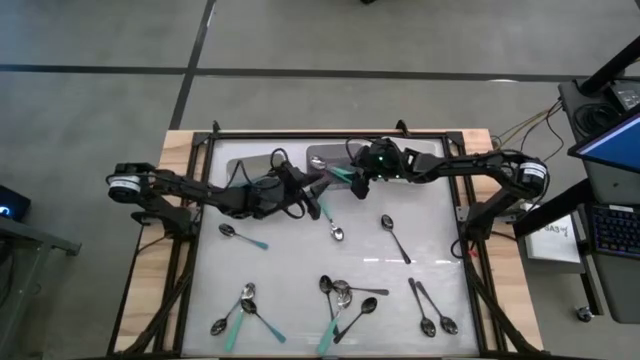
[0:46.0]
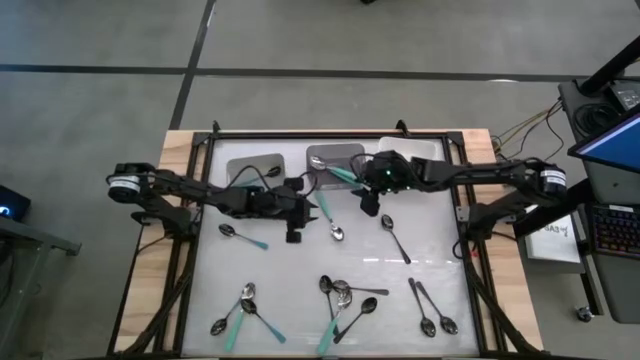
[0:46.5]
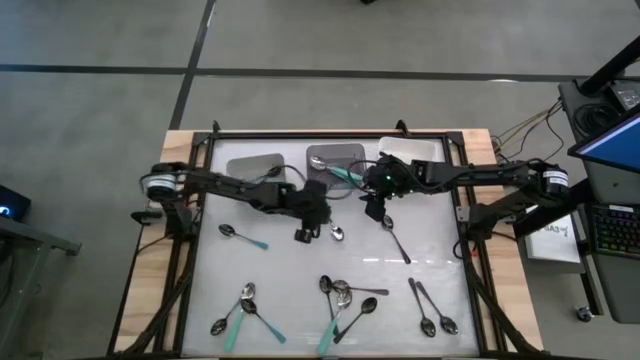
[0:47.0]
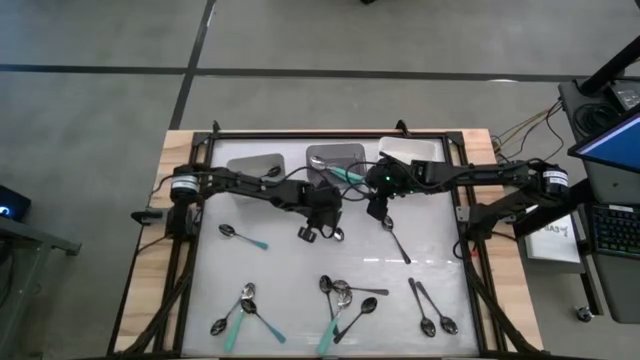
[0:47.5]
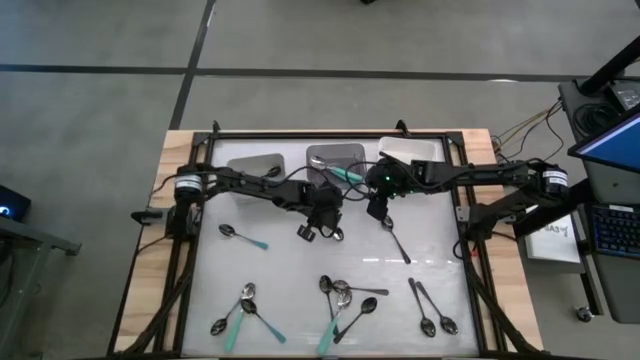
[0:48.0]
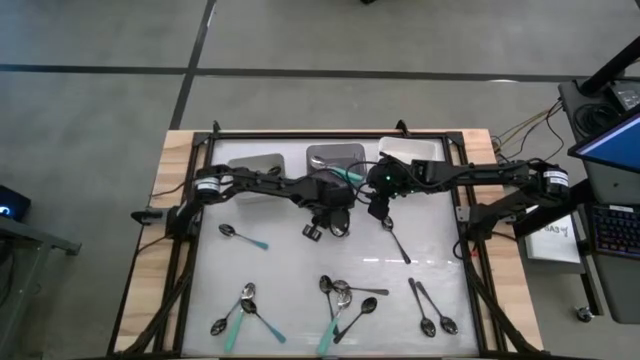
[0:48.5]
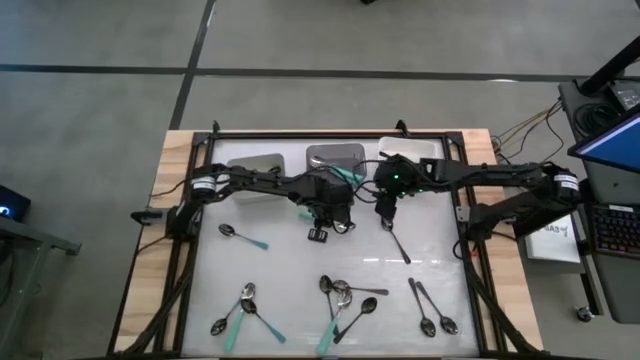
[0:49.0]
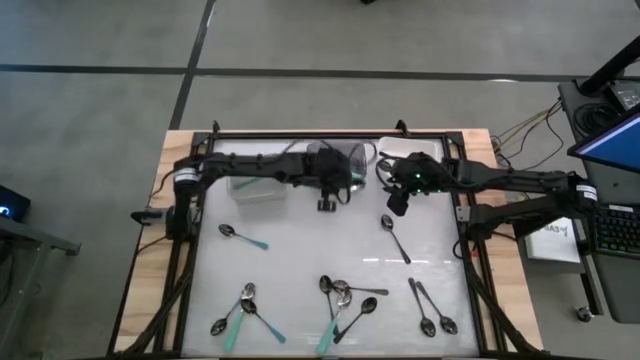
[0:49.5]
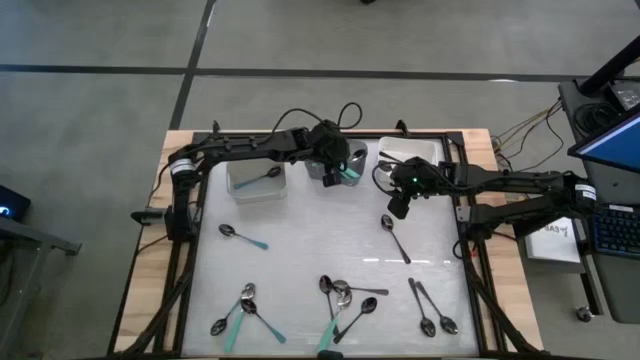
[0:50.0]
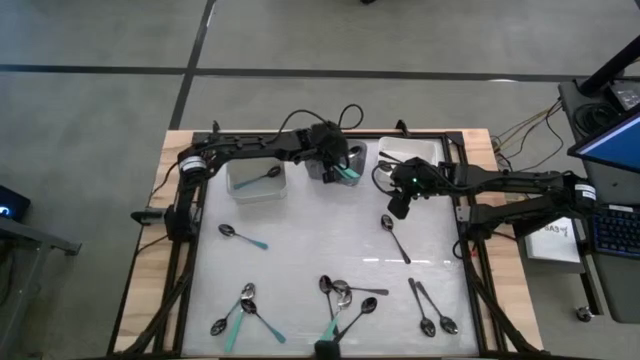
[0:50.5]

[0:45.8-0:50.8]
Task: Sort silverware by color (type)
Put the green spoon into the black bin

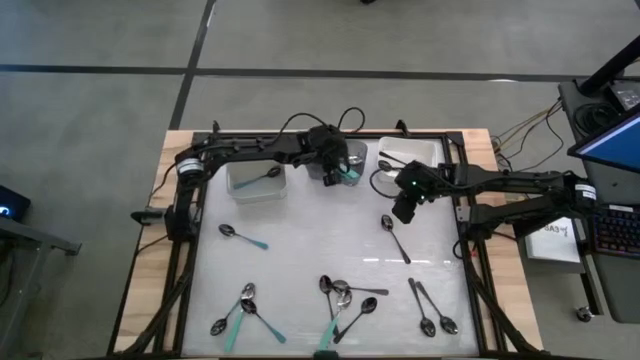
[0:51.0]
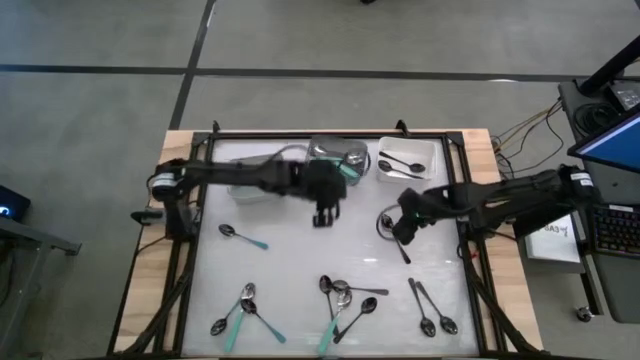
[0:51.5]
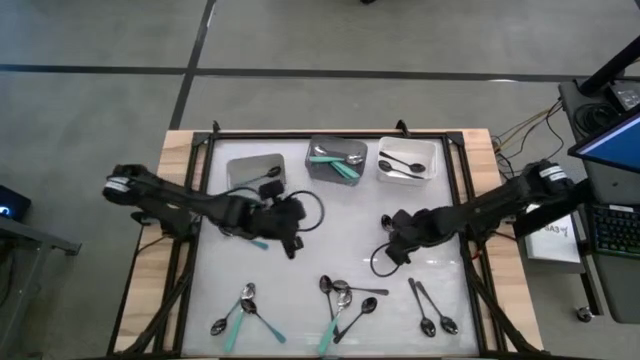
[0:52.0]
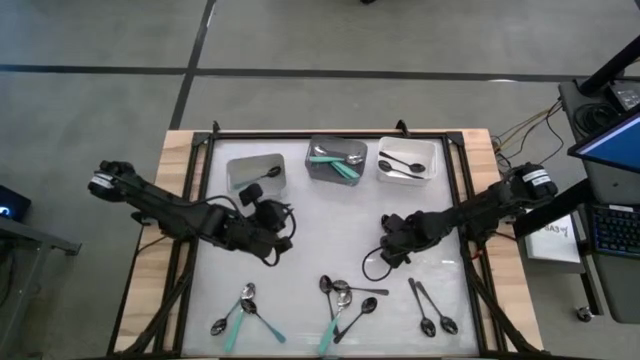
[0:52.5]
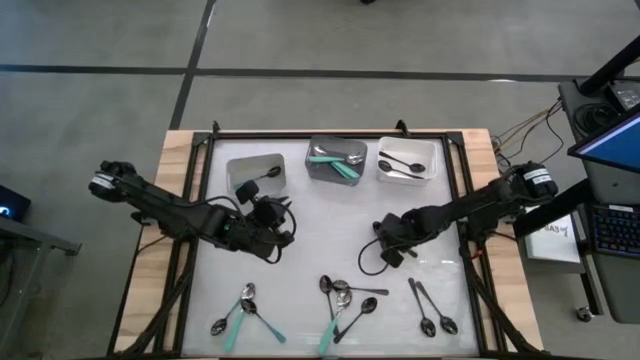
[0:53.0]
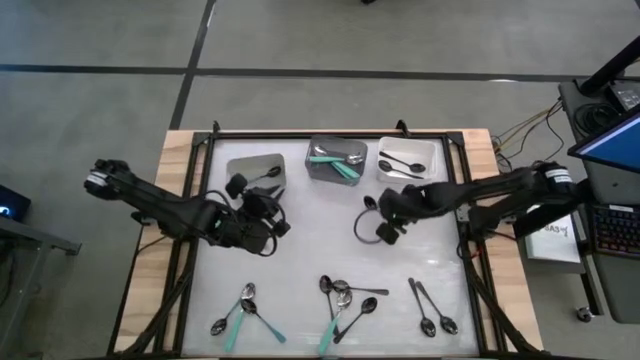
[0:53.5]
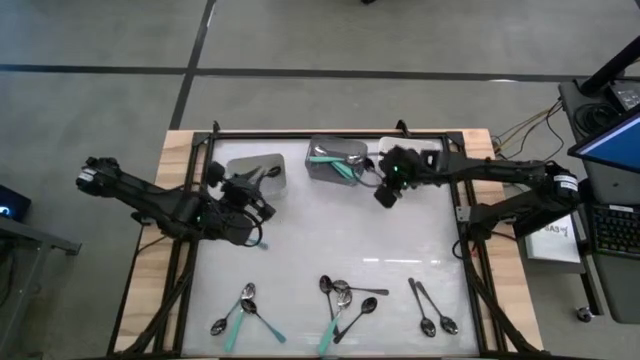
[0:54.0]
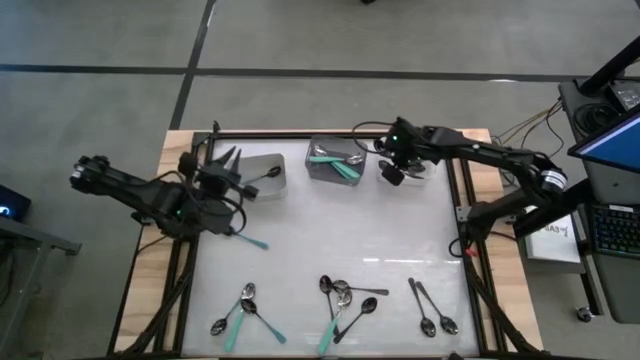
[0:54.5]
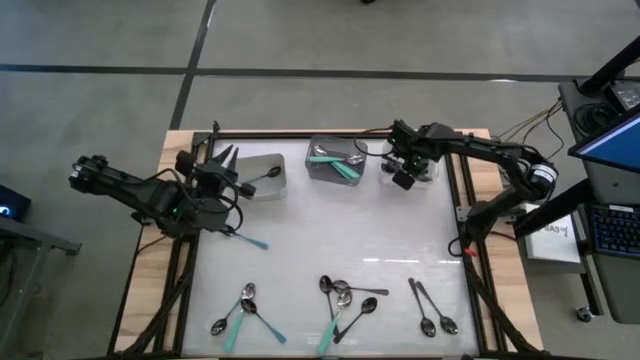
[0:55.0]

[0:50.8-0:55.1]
Put the black spoon into the white bin

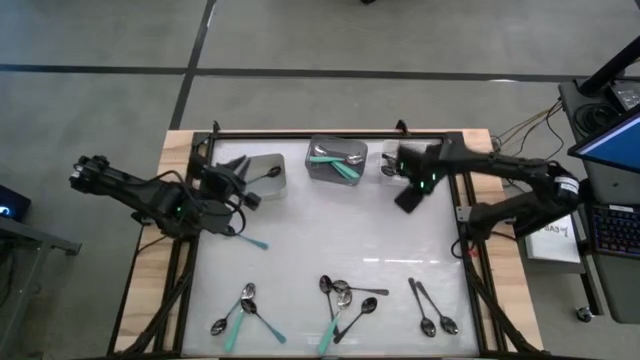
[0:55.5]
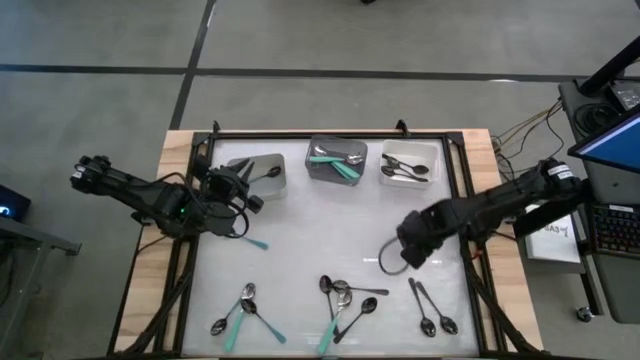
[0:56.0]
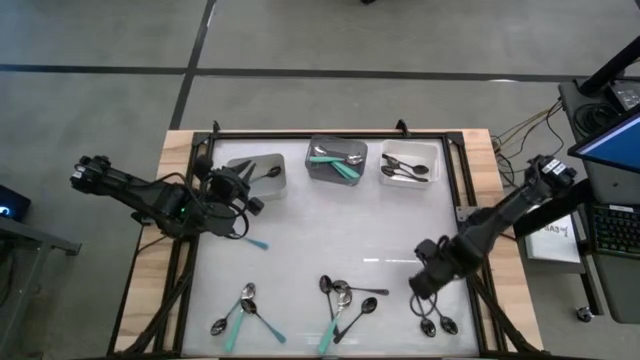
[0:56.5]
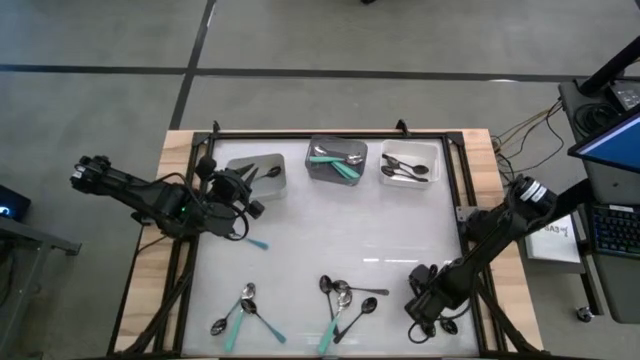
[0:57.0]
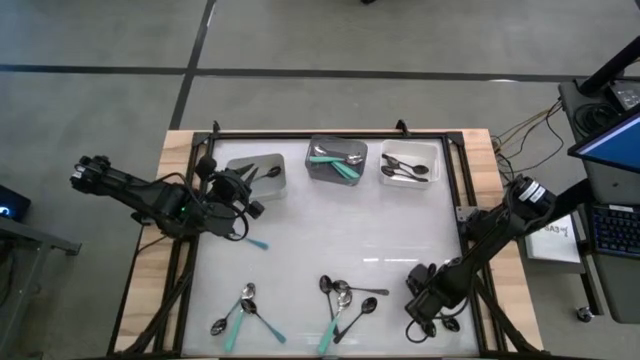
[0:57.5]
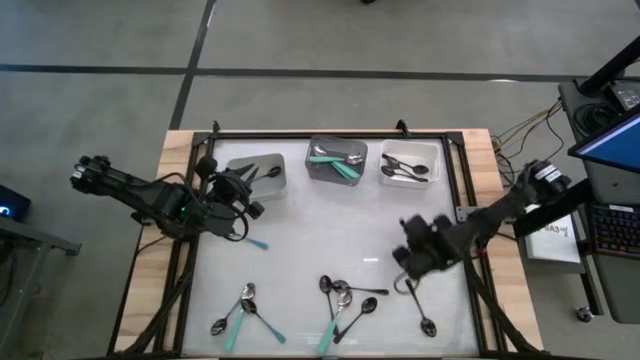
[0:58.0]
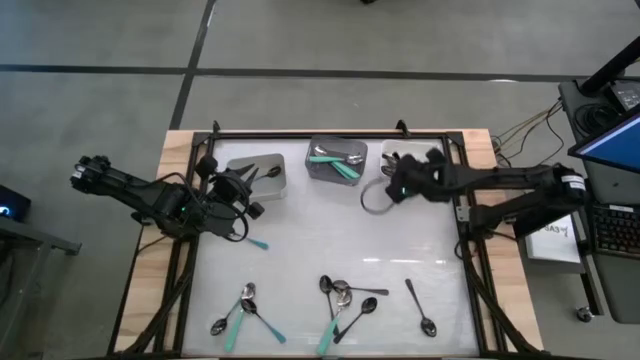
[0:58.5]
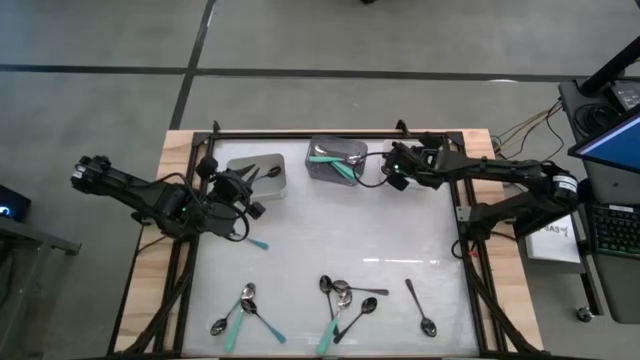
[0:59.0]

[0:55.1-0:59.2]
Put the black spoon into the white bin

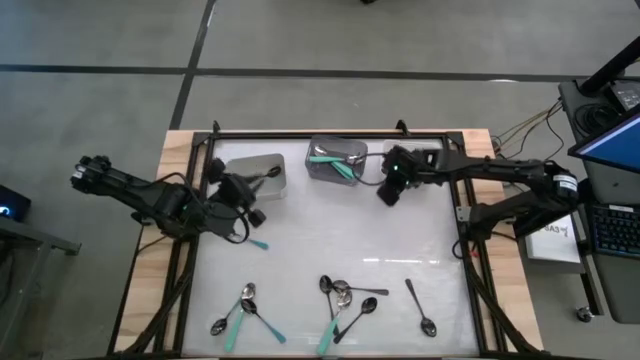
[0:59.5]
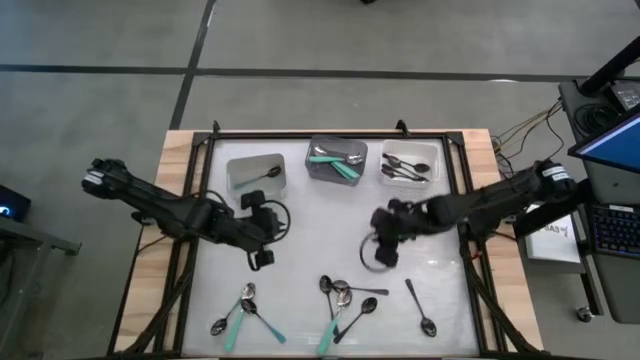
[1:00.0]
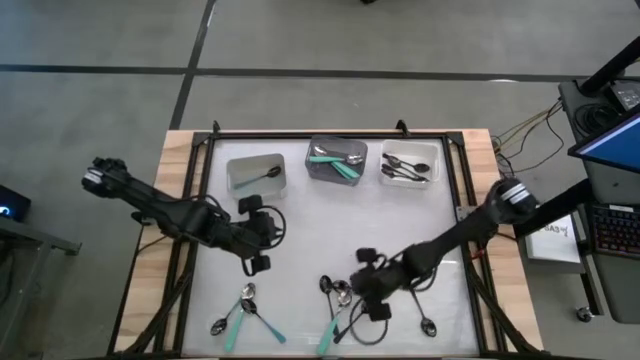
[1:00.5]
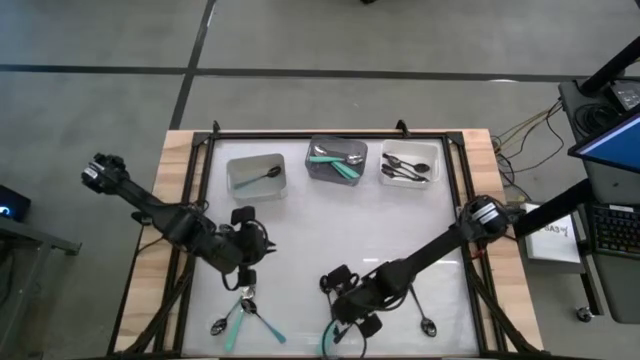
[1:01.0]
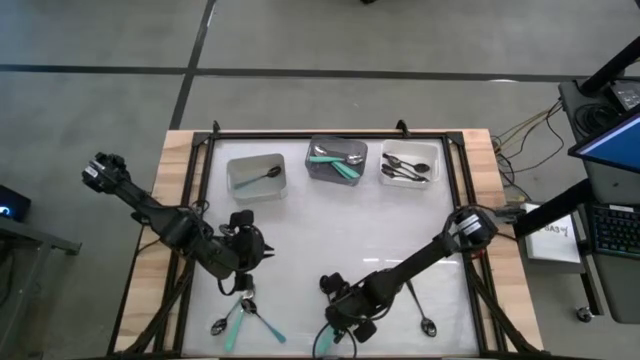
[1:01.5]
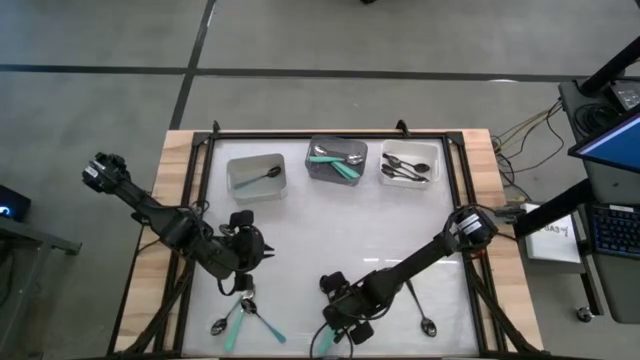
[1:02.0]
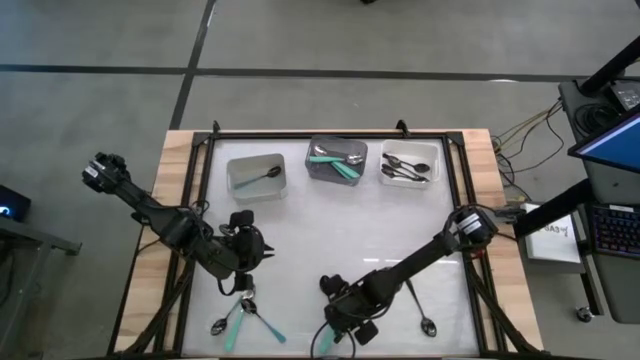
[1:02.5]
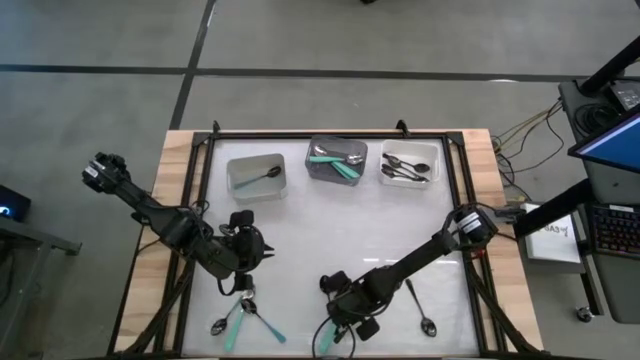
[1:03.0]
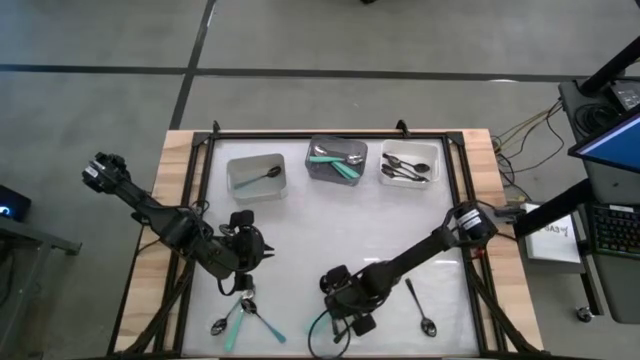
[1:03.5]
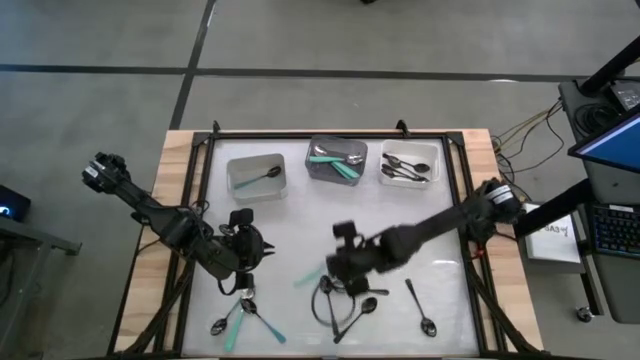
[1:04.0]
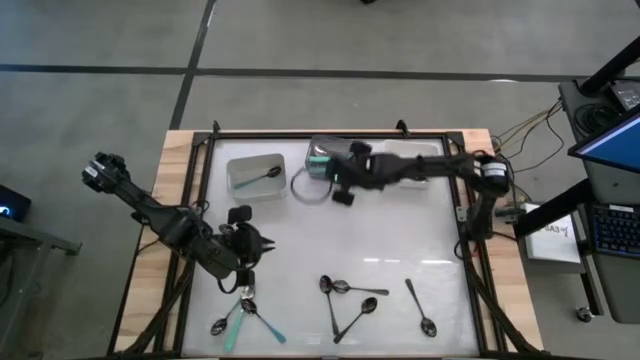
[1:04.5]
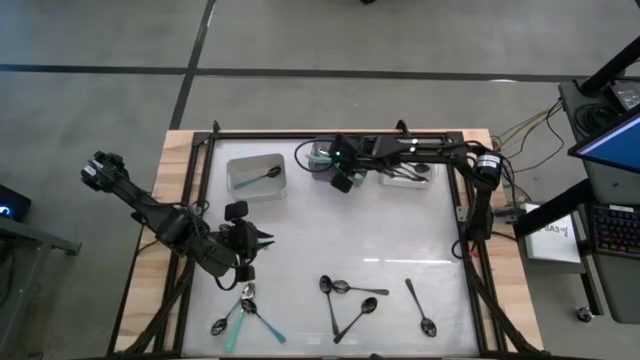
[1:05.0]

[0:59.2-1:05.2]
Put the green spoon into the black bin

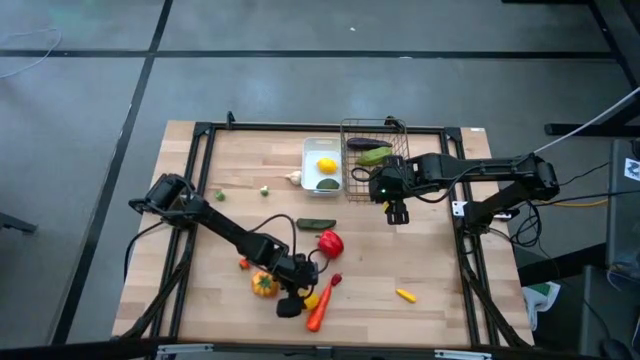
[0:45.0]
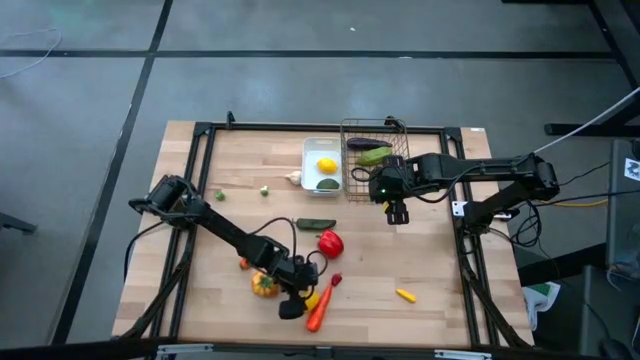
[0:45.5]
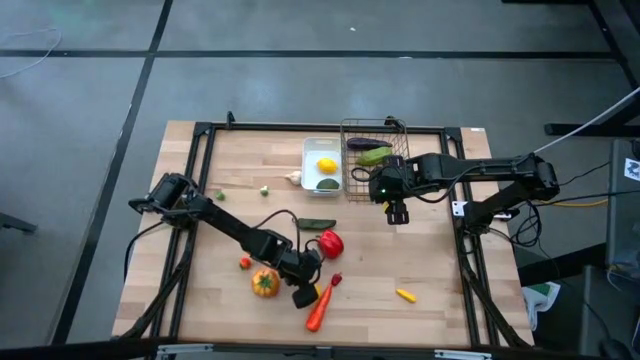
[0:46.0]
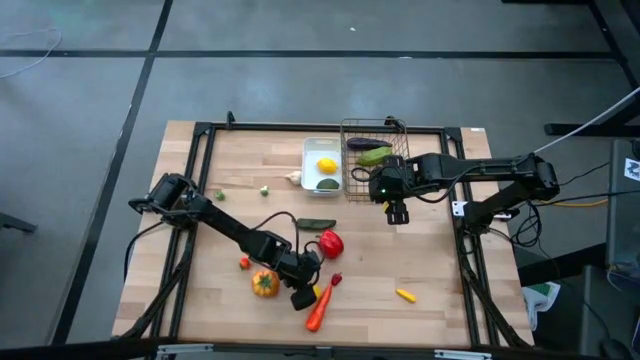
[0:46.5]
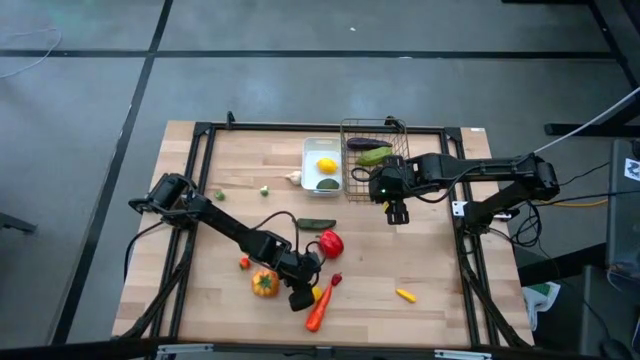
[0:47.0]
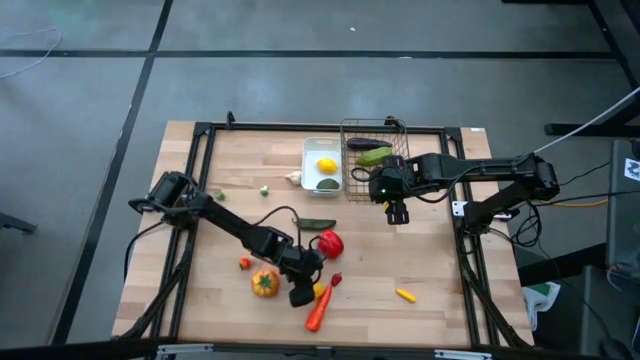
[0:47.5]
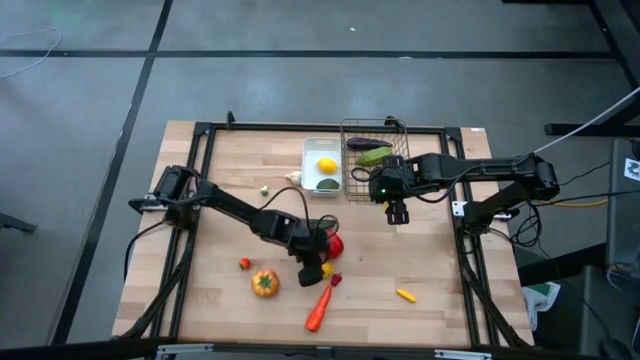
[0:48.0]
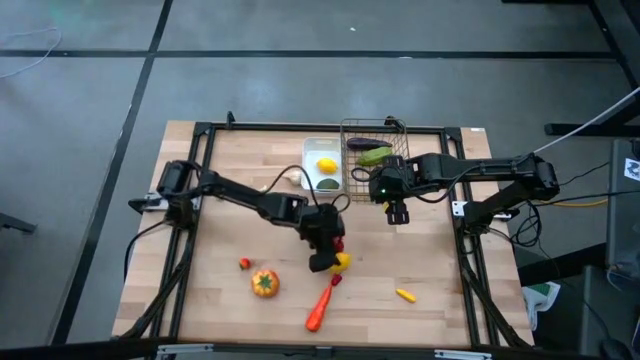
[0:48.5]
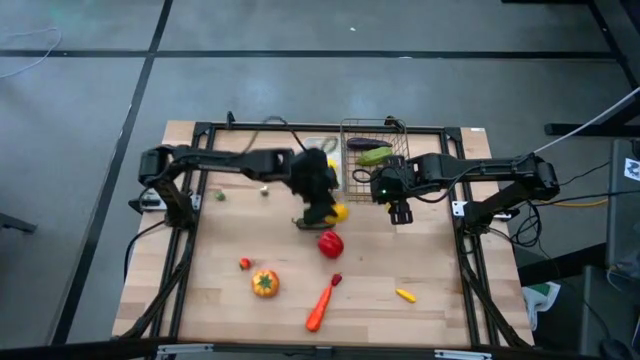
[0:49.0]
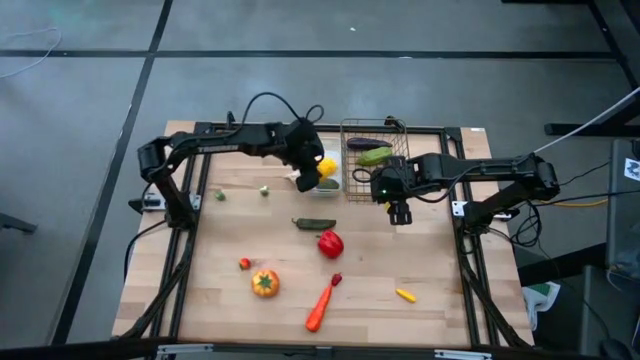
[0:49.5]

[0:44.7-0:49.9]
Task: Sort produce into baskets
Put the yellow lemon into the white bin
